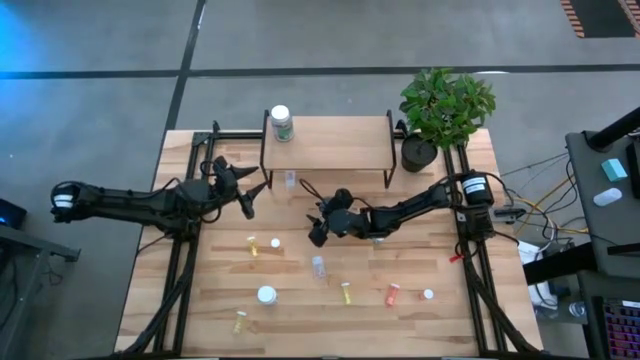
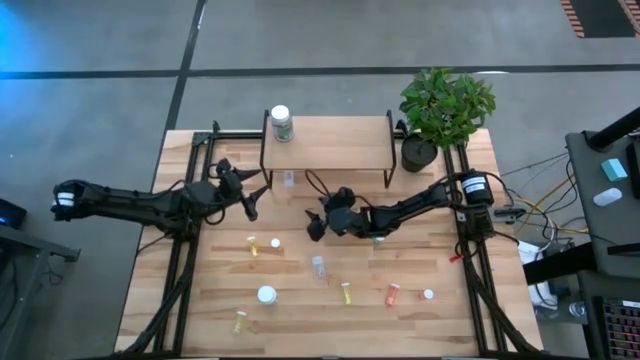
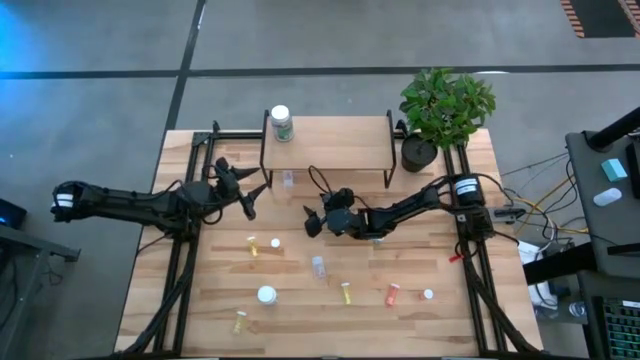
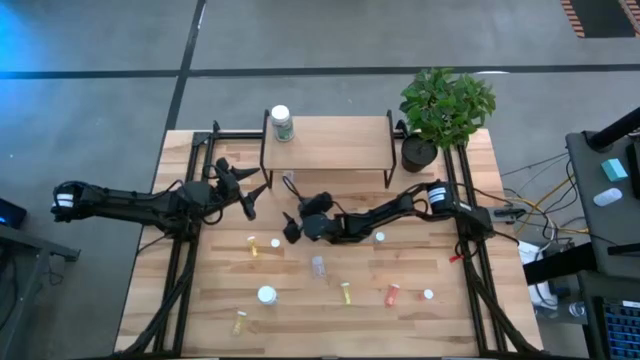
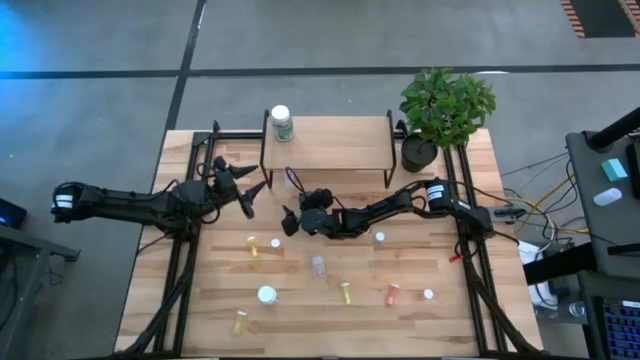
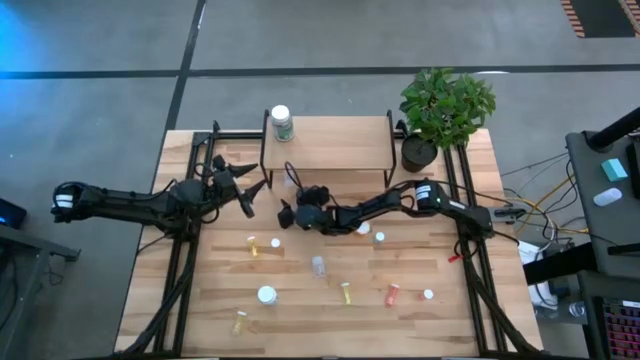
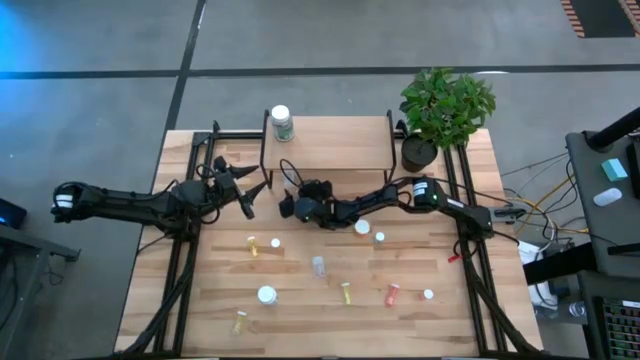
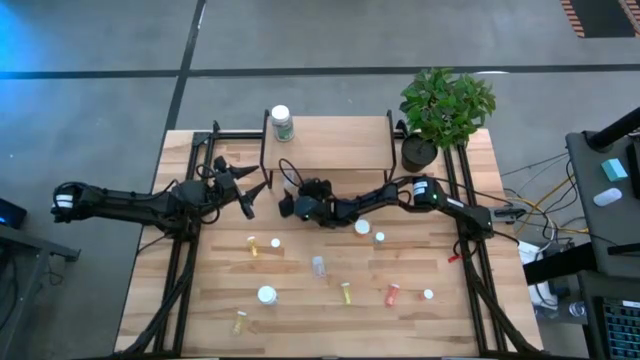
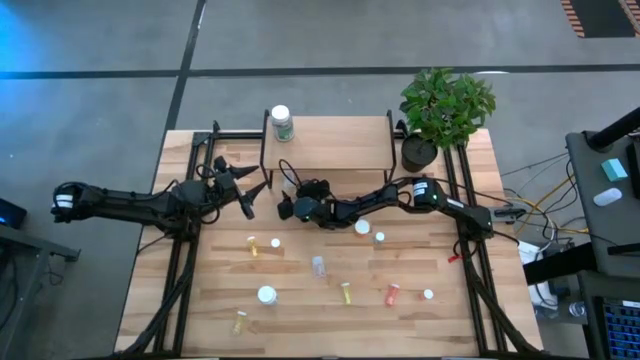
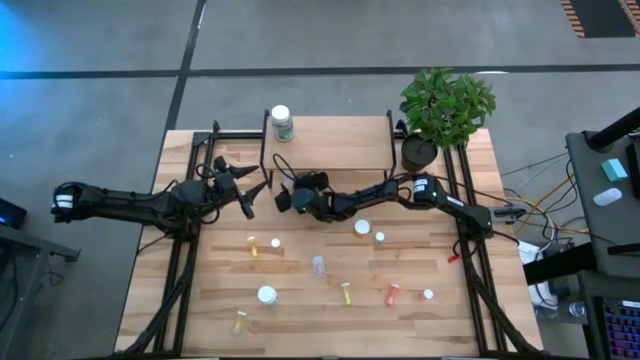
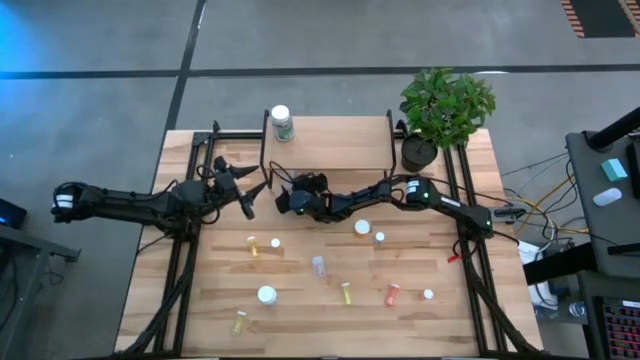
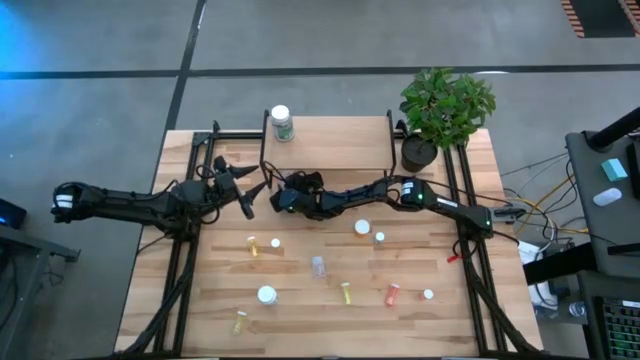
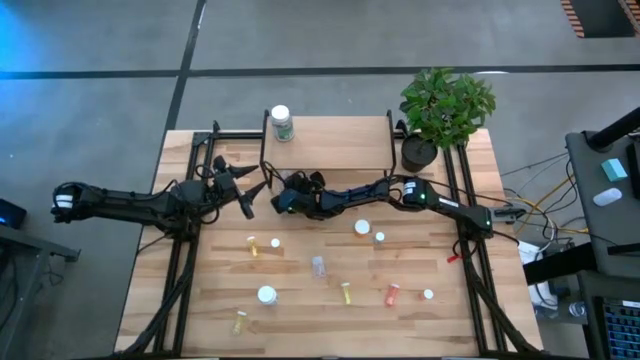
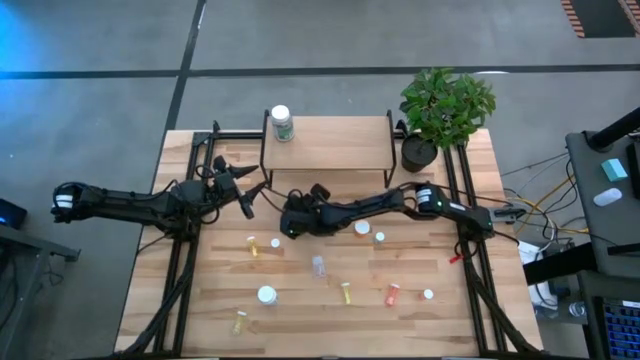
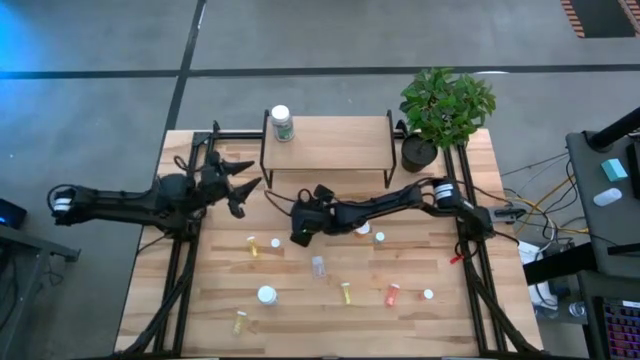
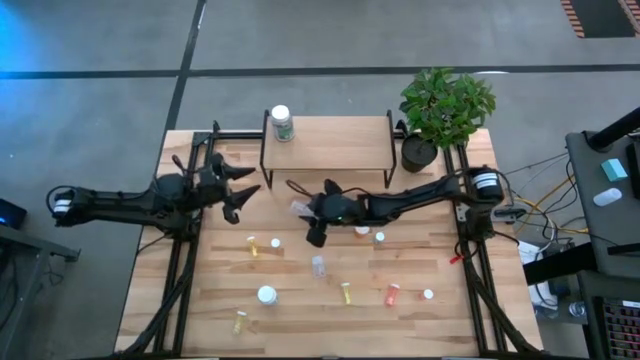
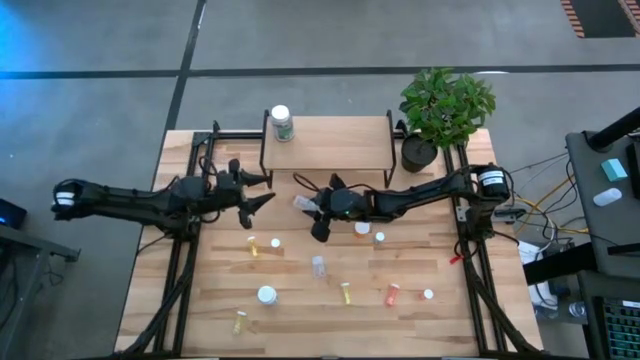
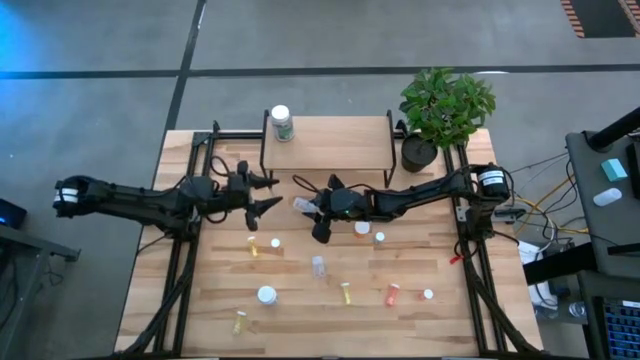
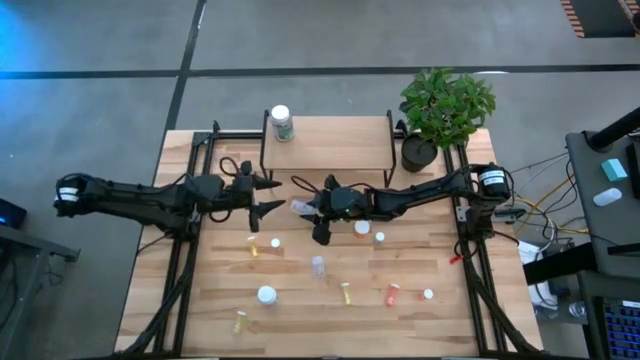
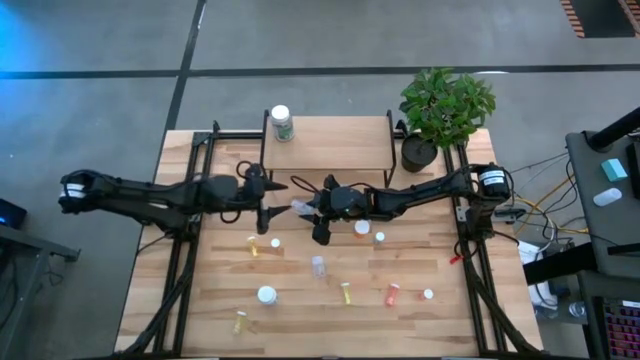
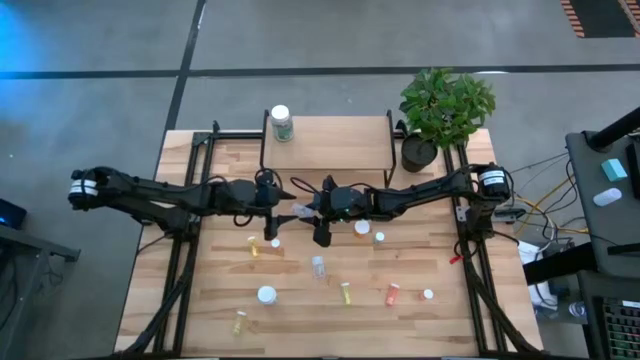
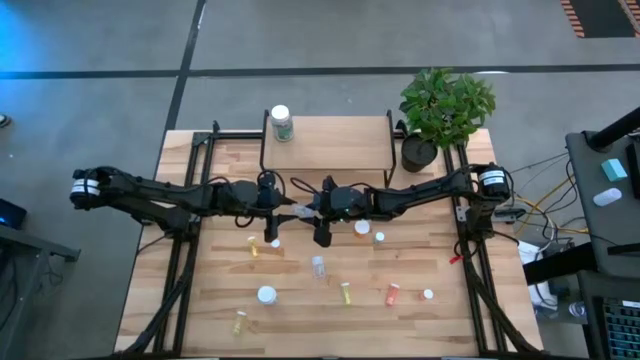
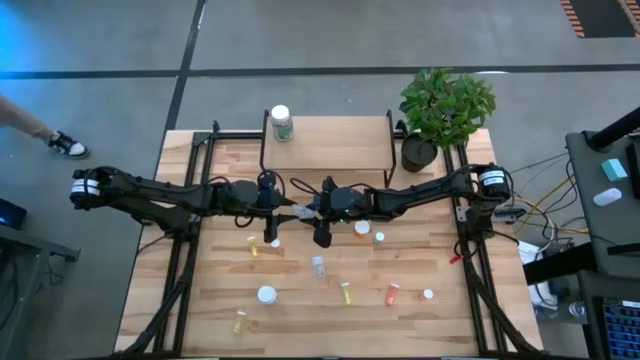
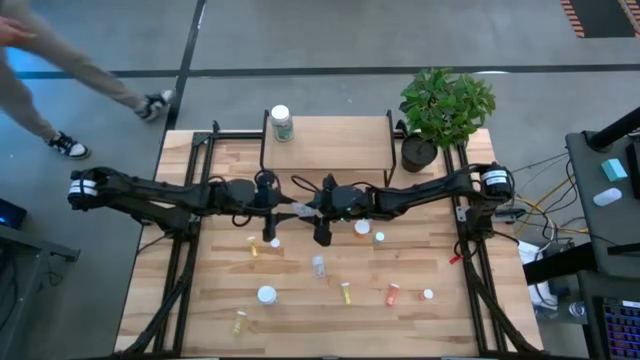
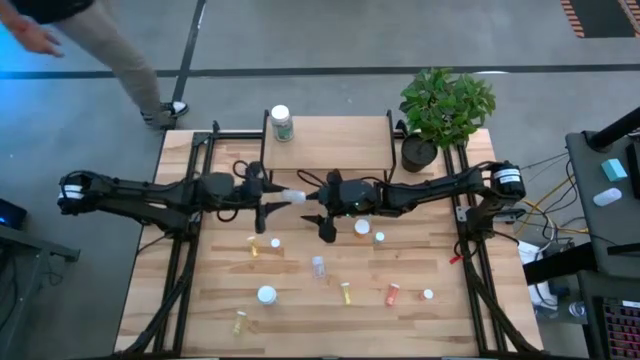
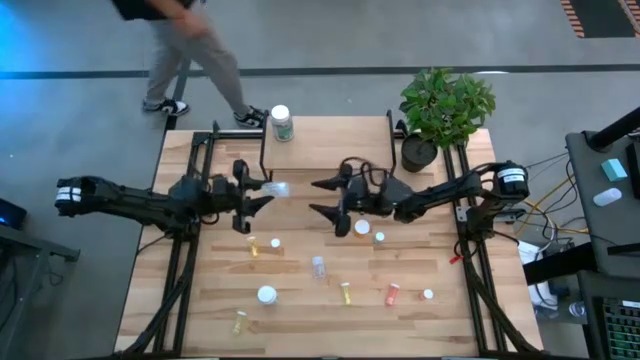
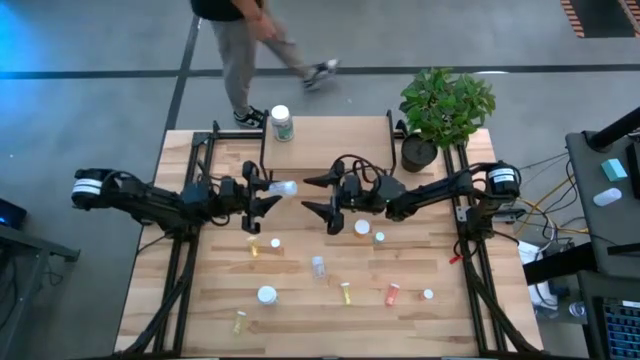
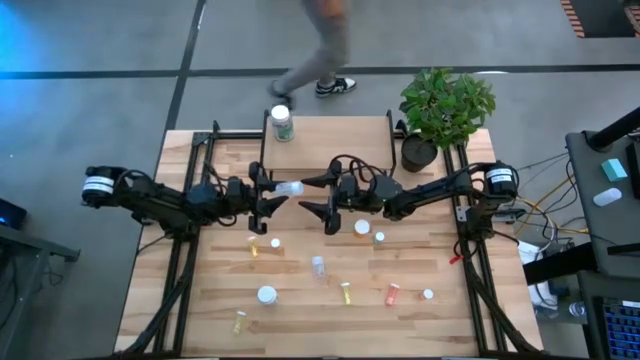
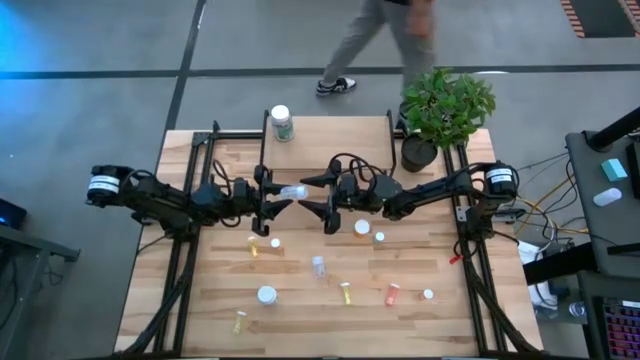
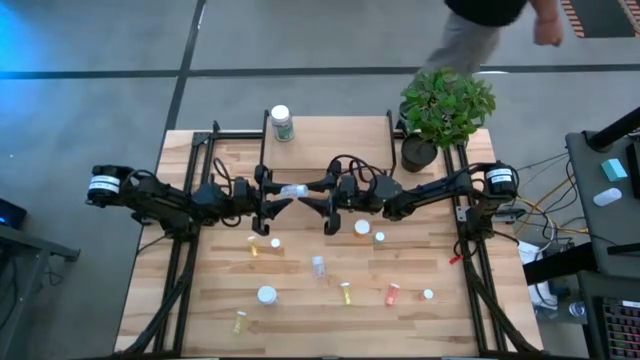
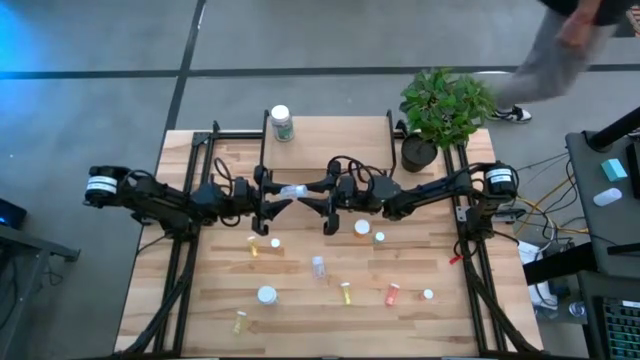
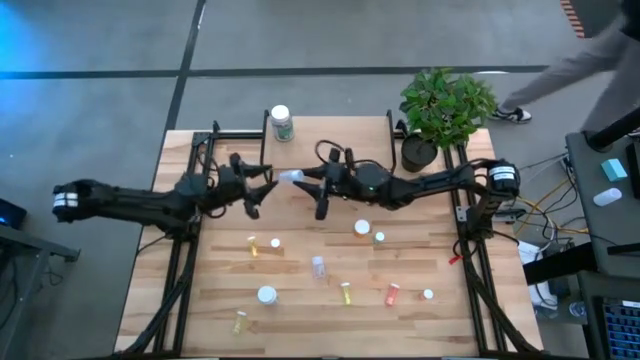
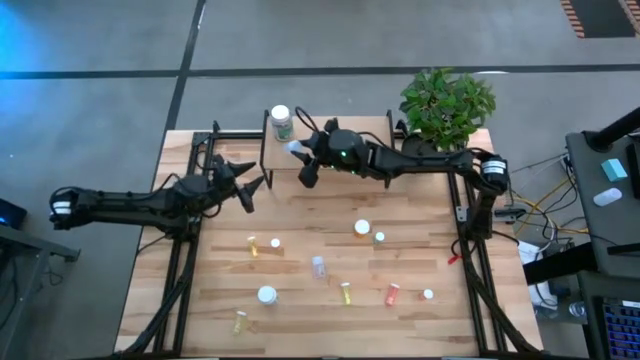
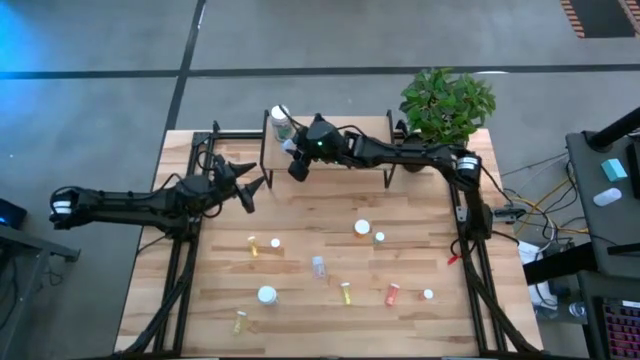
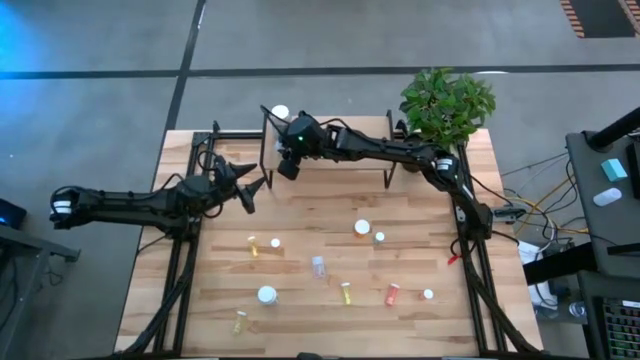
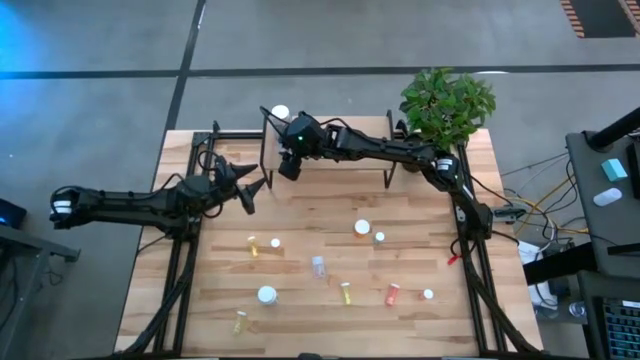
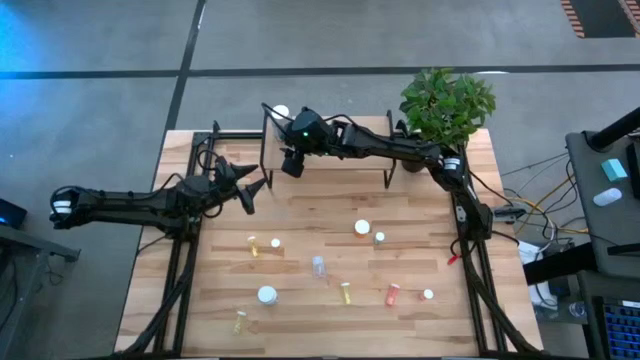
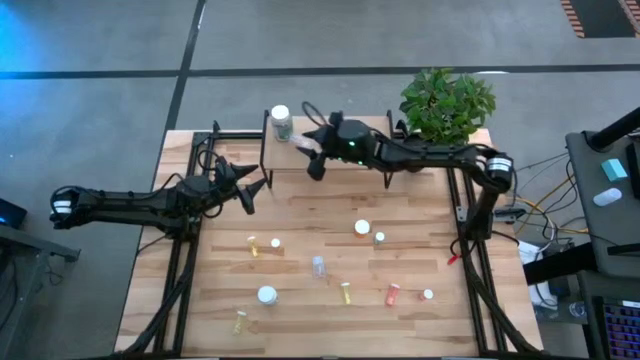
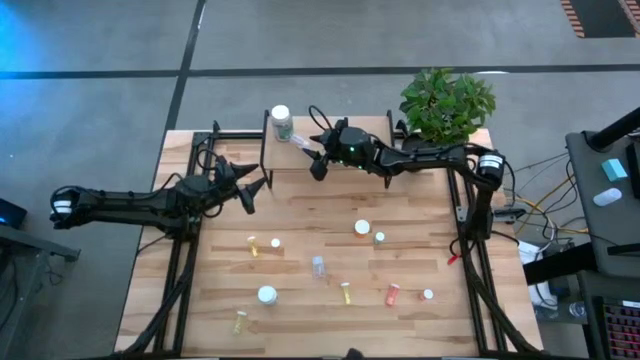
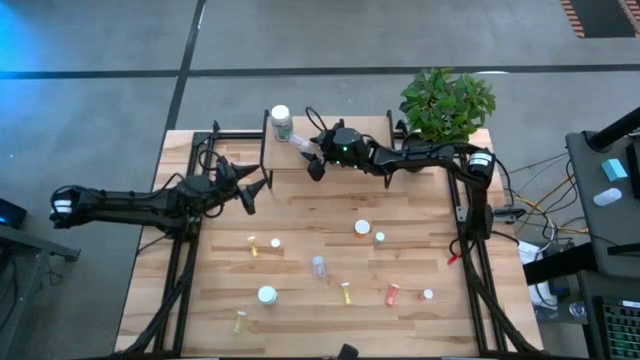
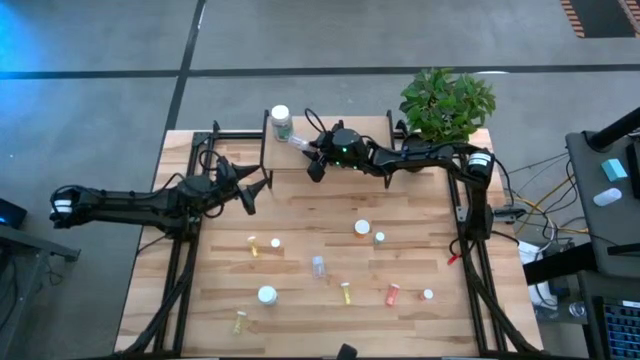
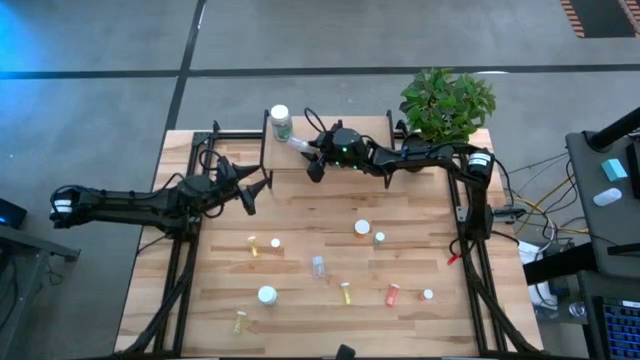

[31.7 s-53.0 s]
Task: Pick and place medicine bottles onto shelf by color
Put the transparent pill bottle on the shelf

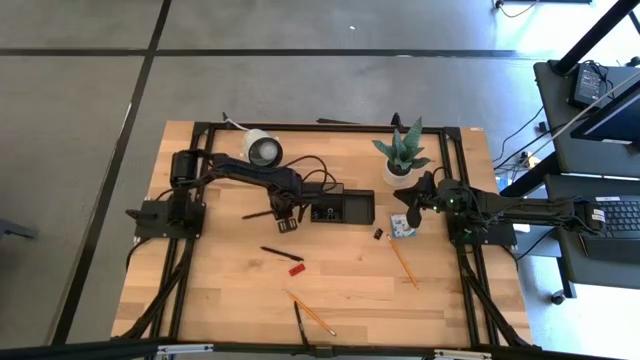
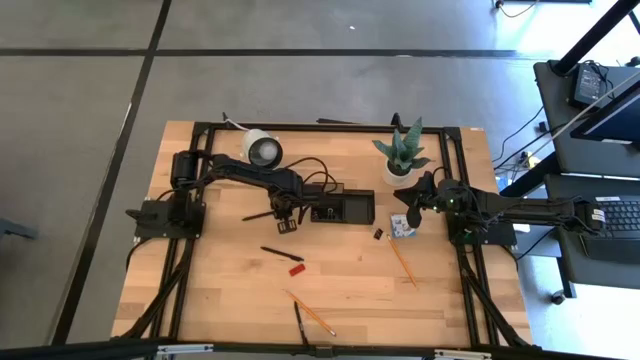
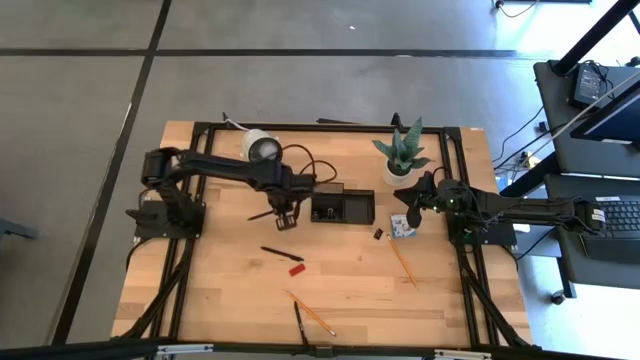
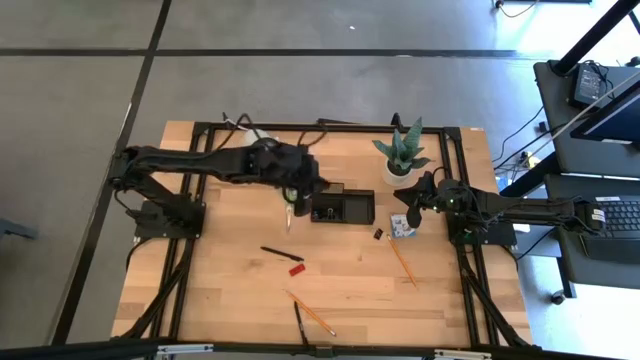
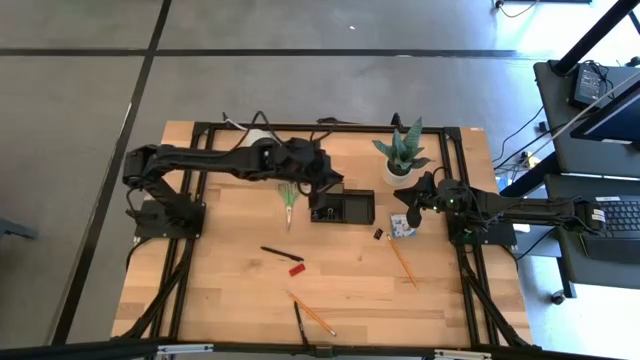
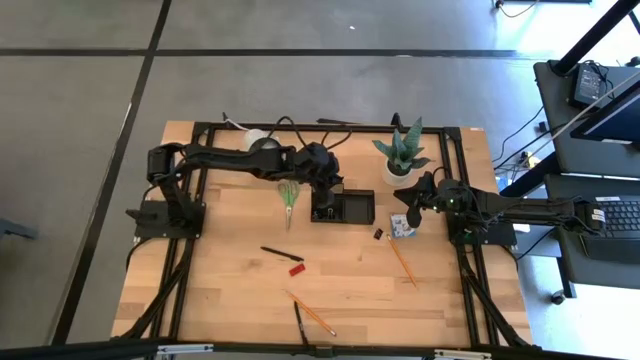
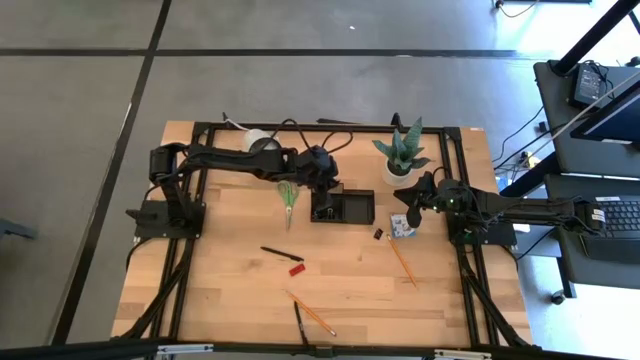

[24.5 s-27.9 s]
Task: Pick and place office supplies into organizer
Put the top black pen in the desk organizer
